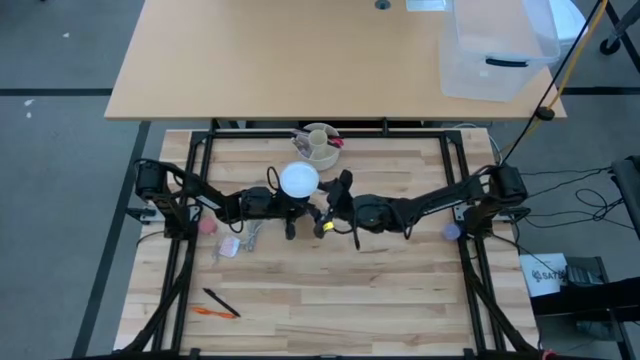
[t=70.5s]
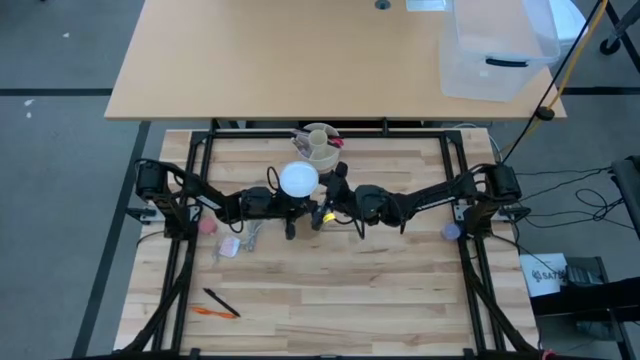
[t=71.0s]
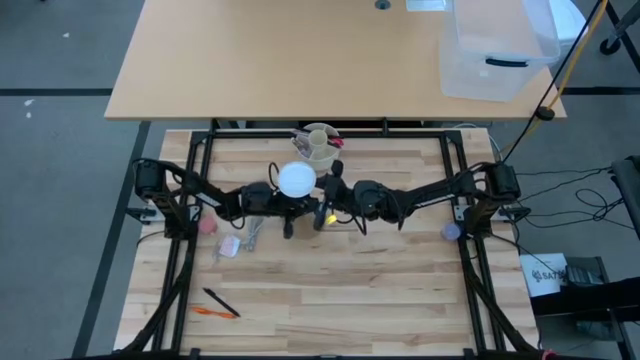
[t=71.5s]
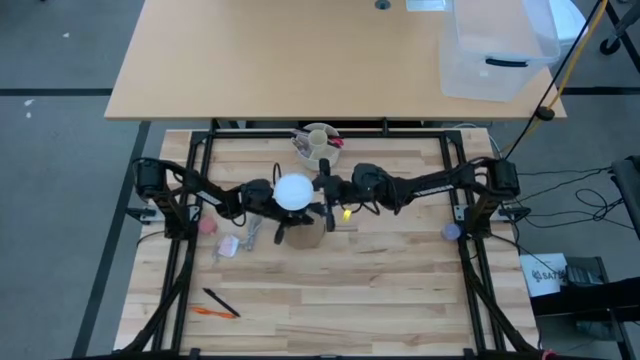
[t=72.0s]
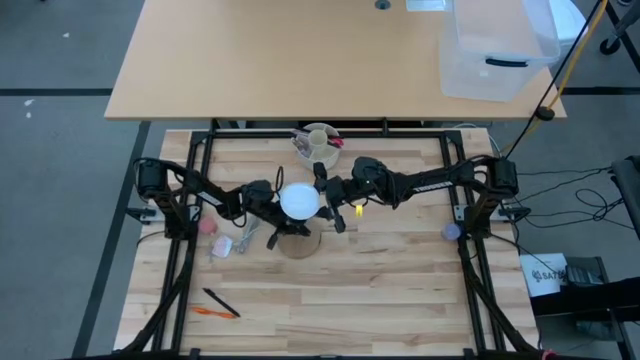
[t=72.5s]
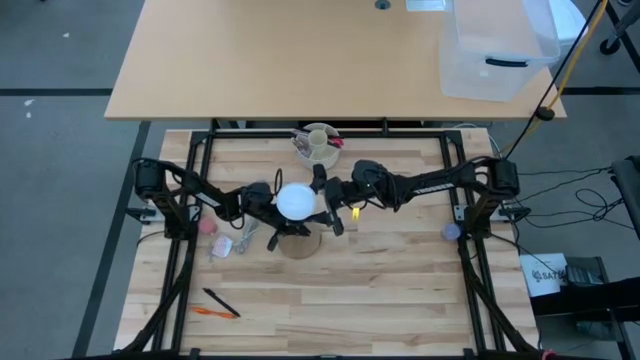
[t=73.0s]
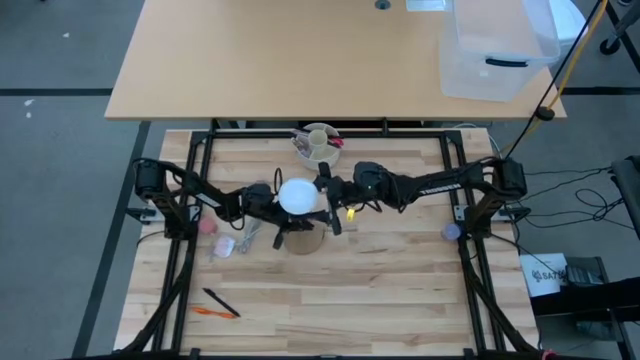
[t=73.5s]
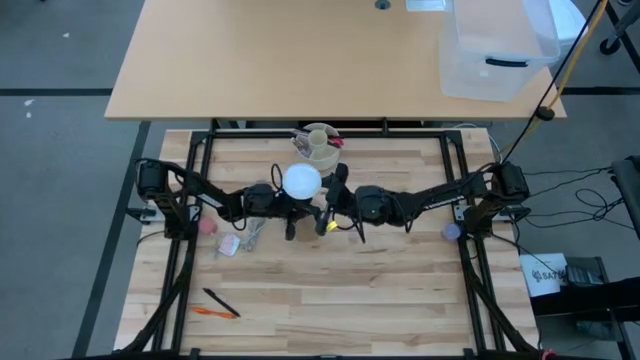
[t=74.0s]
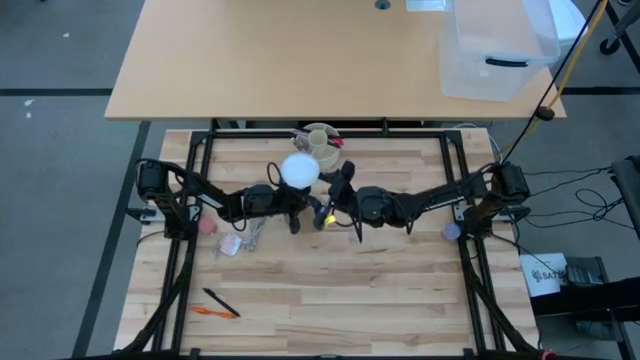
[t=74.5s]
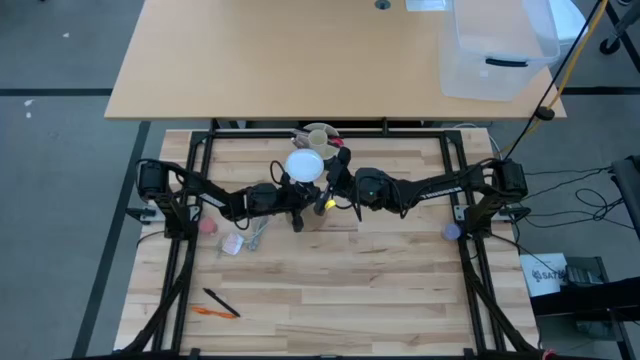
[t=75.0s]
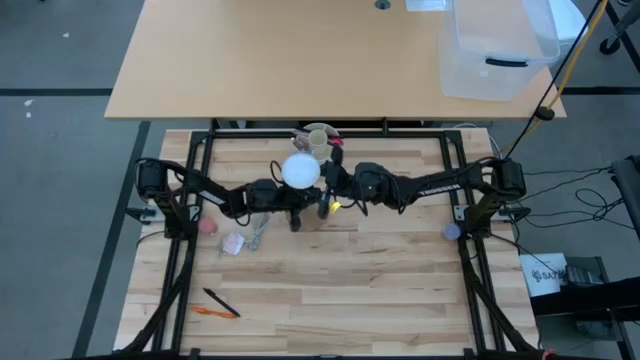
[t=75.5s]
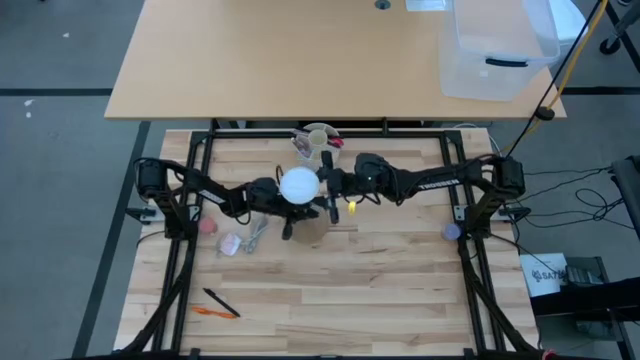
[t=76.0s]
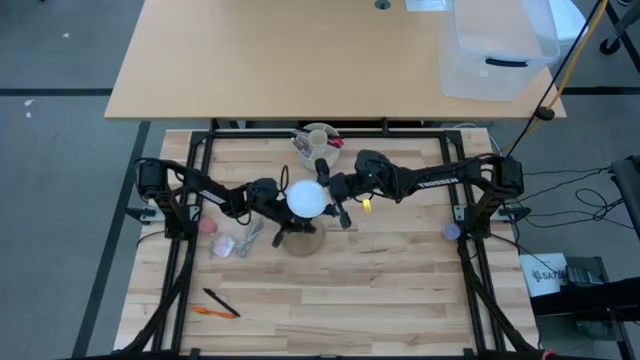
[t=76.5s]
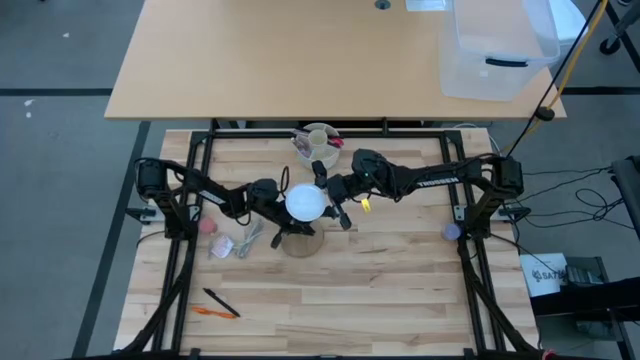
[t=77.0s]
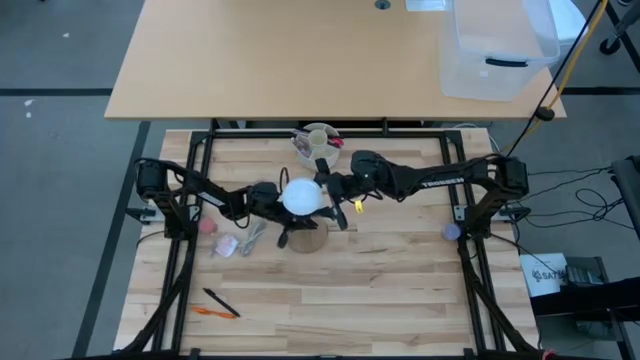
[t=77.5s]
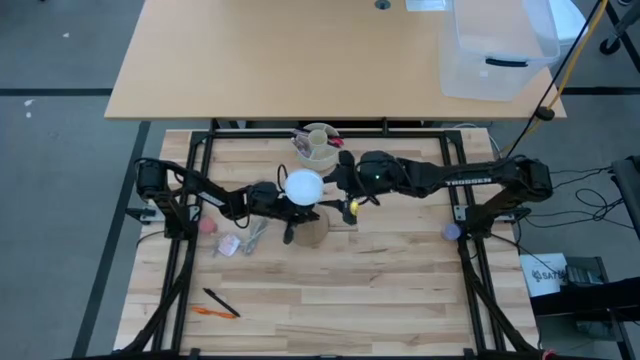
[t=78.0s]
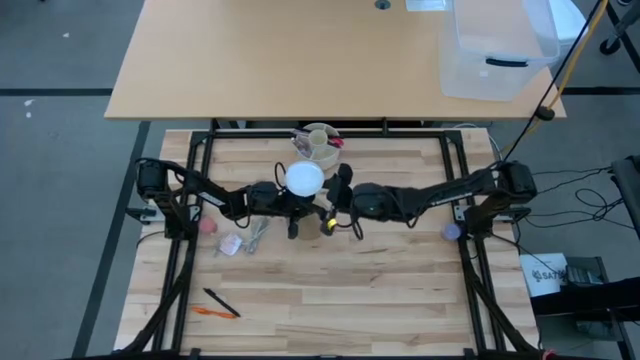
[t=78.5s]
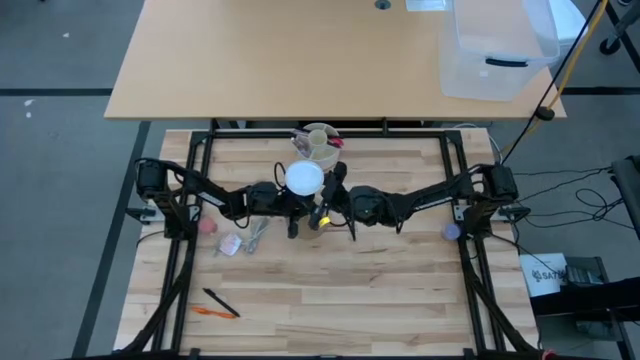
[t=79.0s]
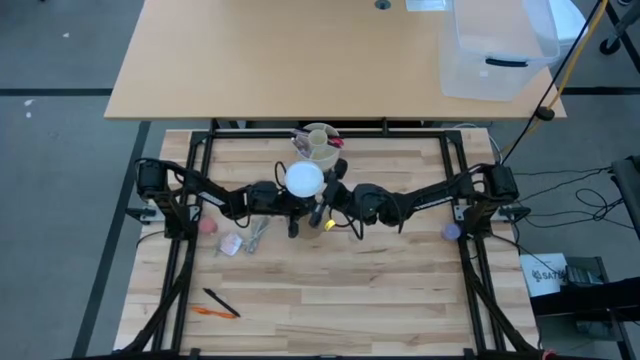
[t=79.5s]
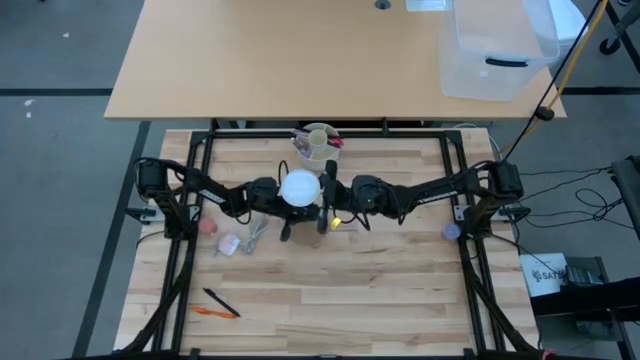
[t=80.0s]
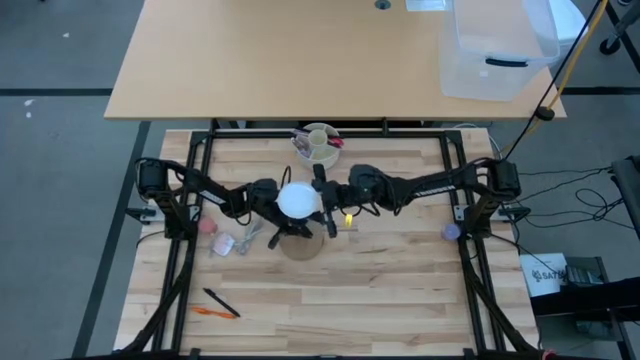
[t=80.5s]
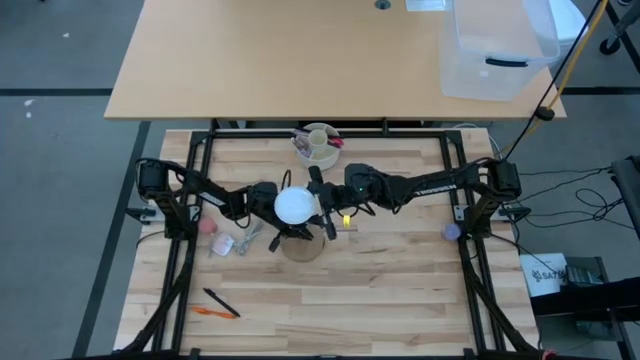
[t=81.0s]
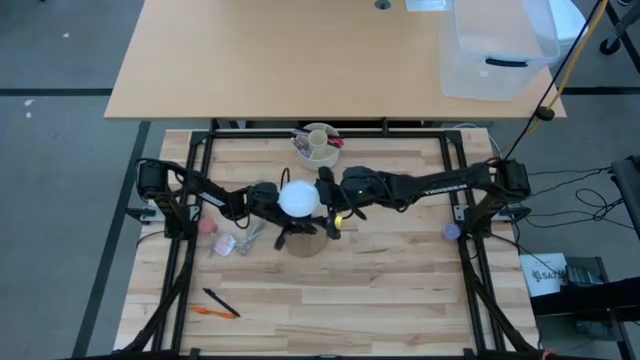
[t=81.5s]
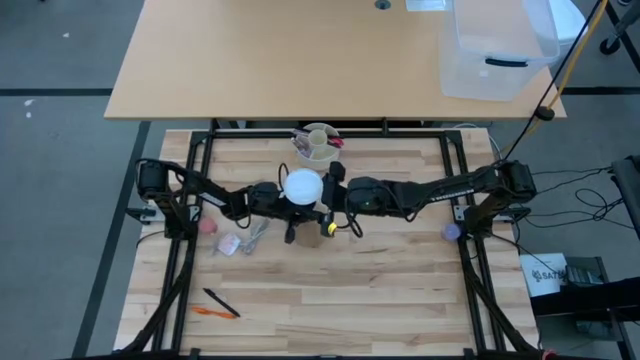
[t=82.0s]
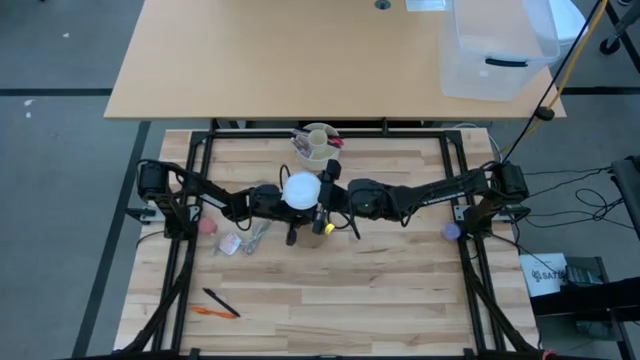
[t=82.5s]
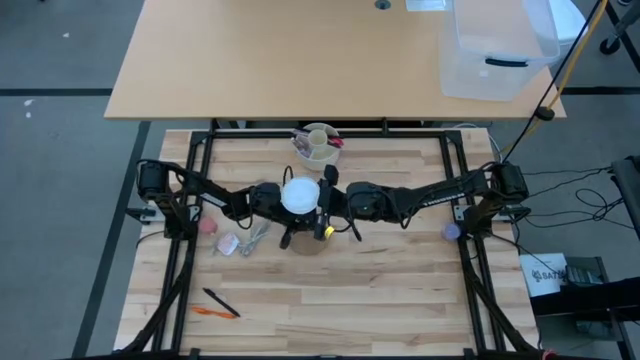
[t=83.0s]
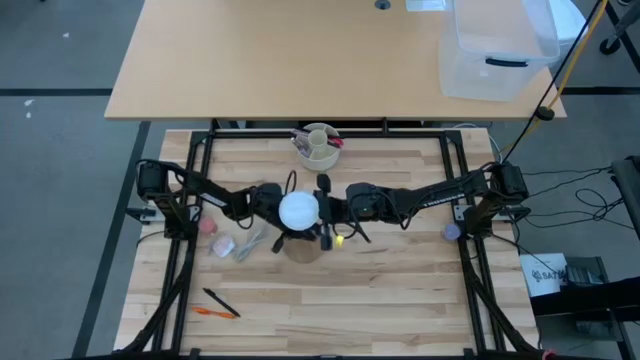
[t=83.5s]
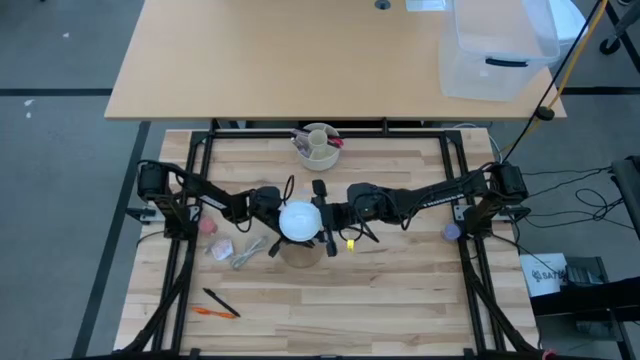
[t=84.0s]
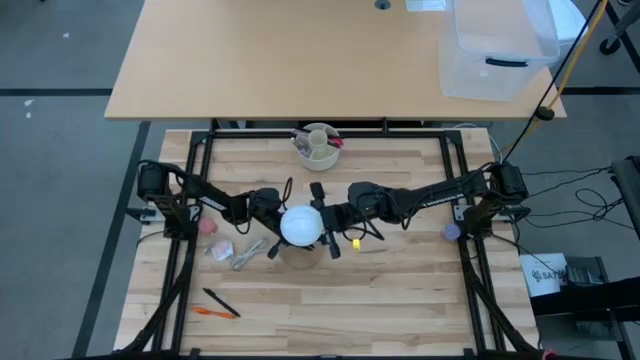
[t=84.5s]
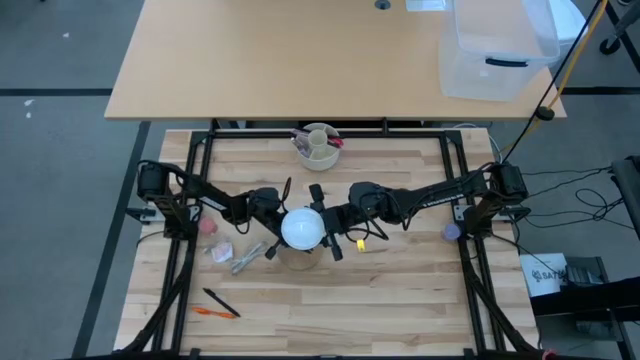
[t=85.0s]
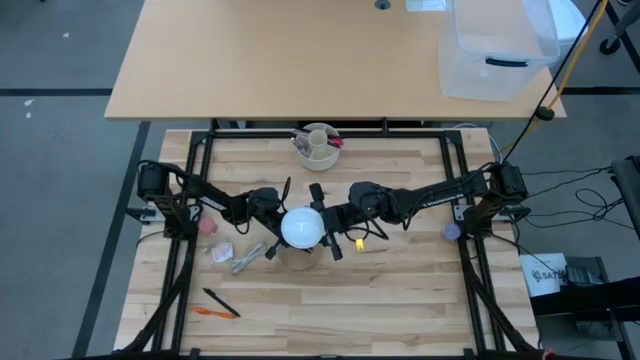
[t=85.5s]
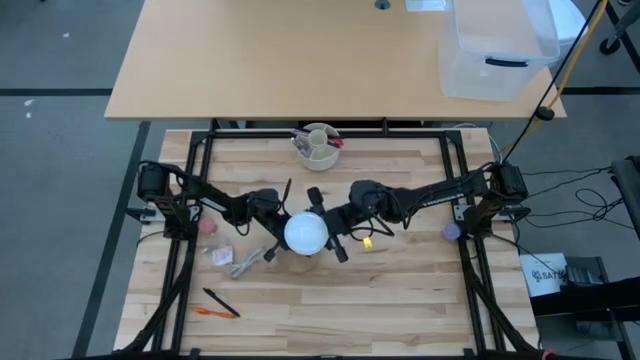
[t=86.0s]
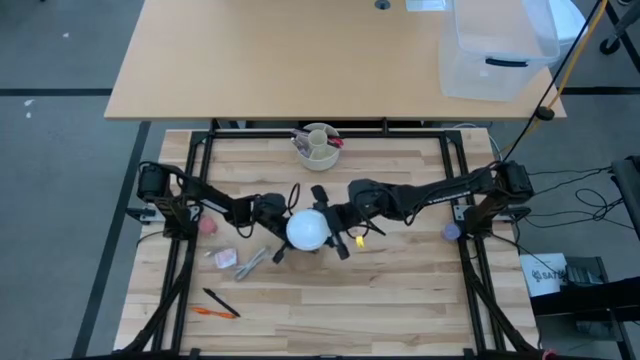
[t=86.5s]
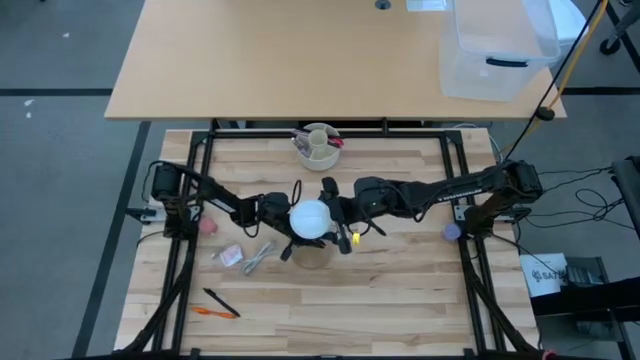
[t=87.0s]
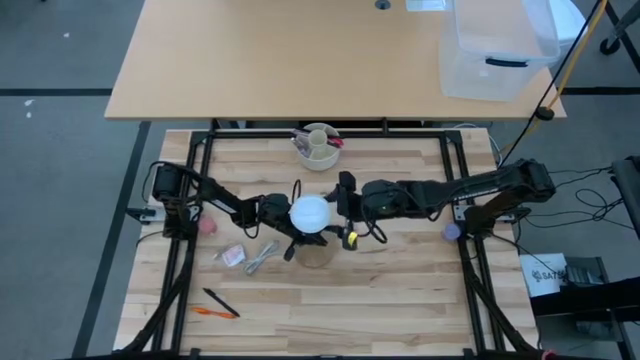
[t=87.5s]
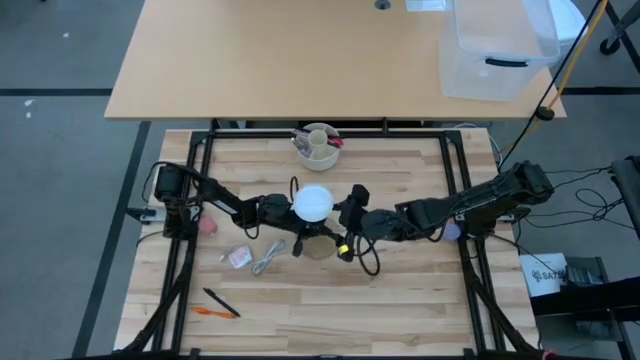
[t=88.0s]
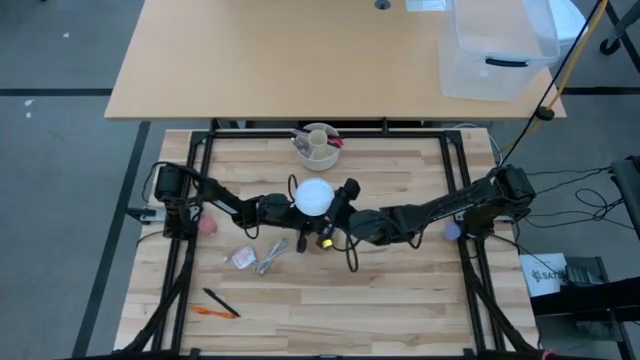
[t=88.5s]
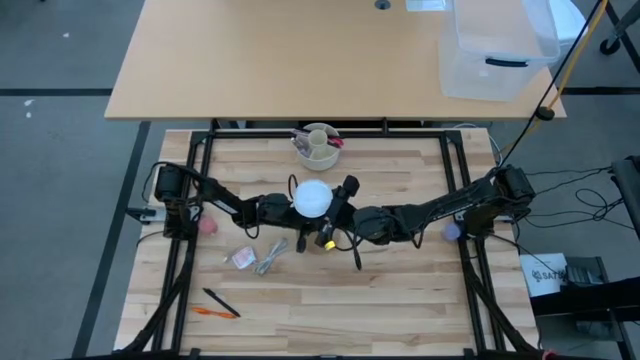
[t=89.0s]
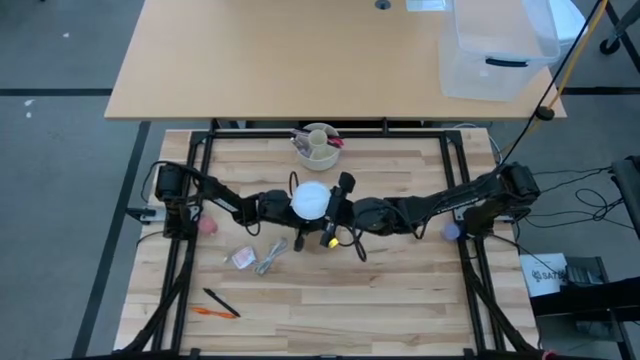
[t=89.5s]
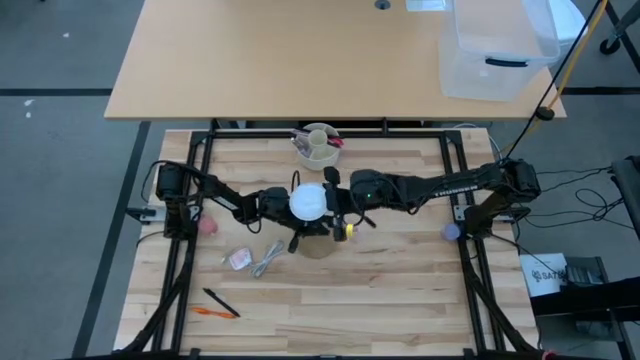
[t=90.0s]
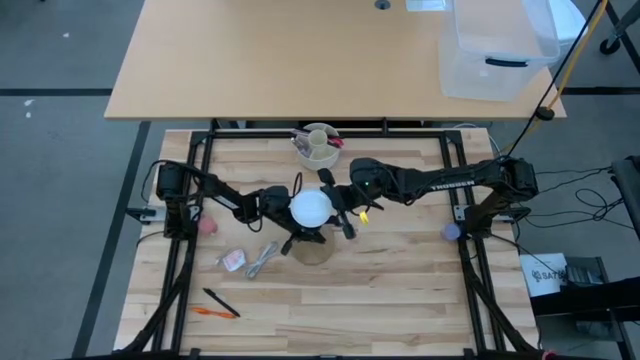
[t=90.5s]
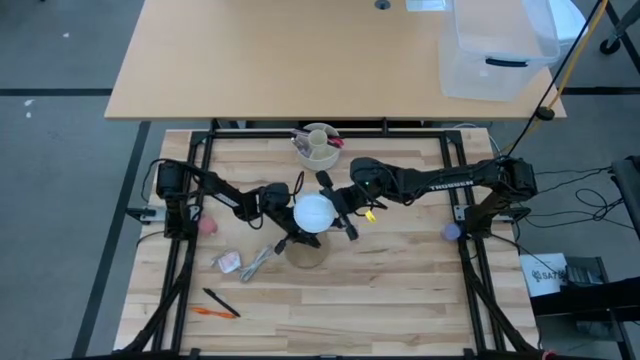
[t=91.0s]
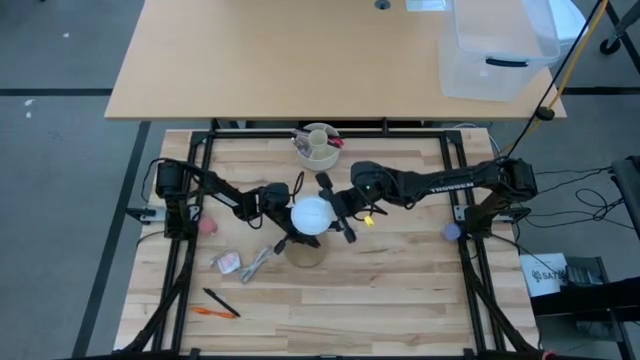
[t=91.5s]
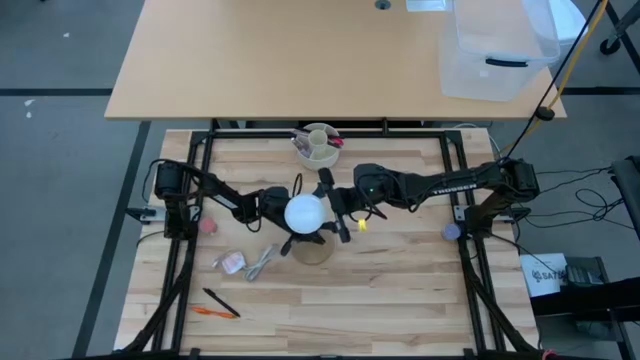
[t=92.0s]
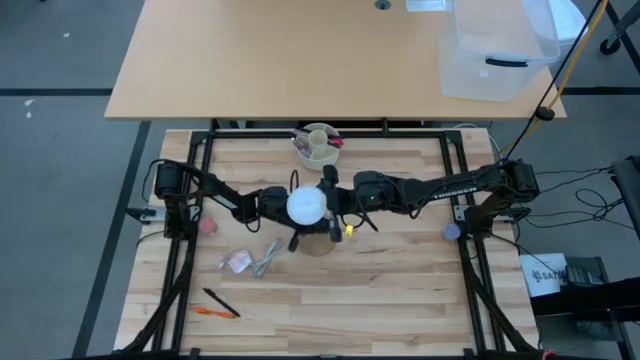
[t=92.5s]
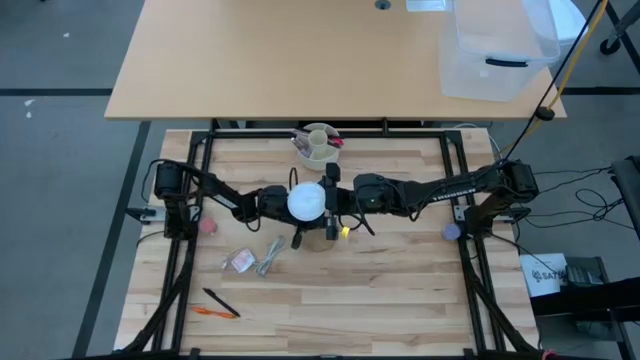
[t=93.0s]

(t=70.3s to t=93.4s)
Task: Screw lightbulb
Remove the lightbulb from the wooden lamp
